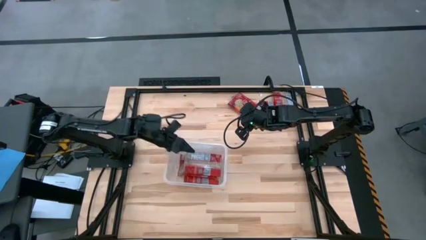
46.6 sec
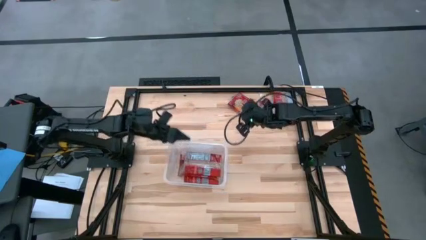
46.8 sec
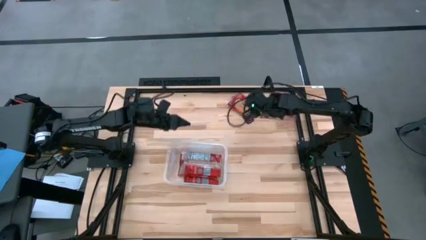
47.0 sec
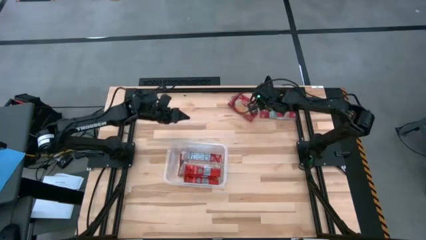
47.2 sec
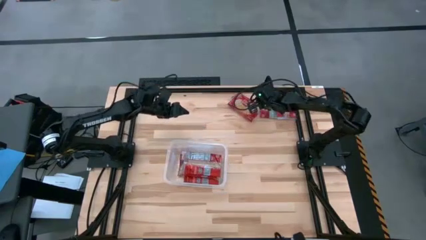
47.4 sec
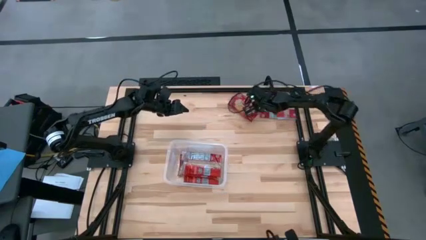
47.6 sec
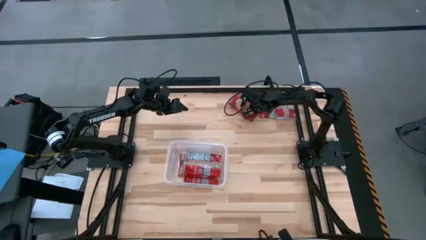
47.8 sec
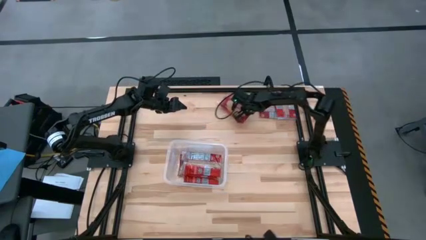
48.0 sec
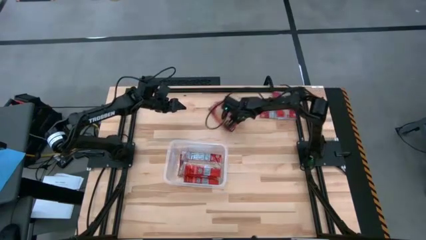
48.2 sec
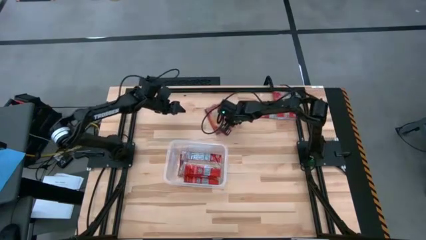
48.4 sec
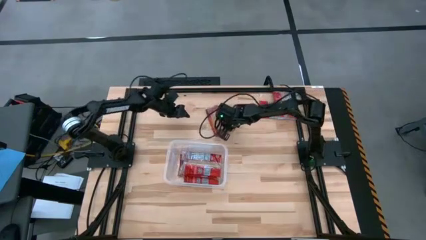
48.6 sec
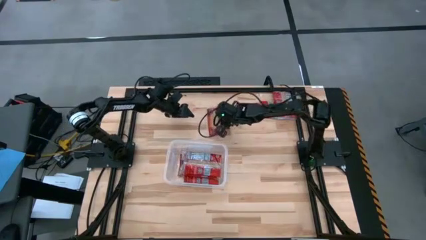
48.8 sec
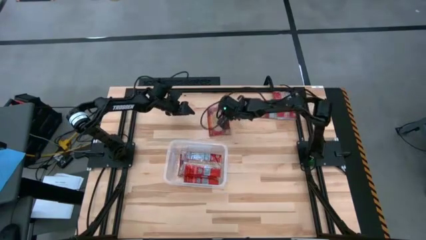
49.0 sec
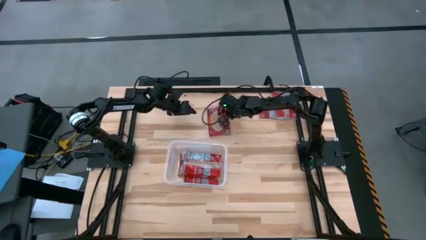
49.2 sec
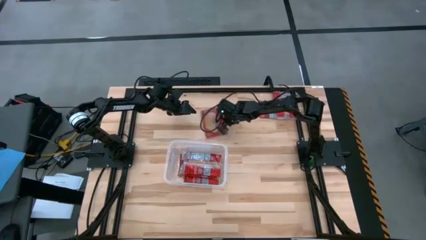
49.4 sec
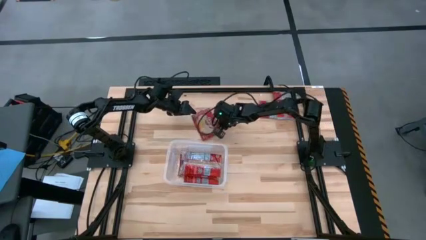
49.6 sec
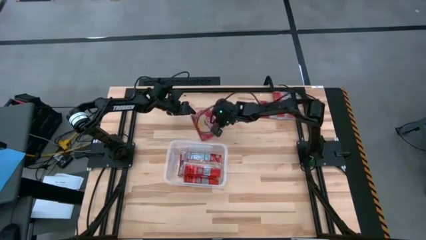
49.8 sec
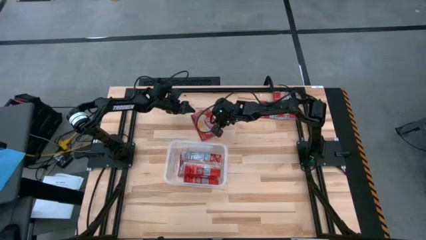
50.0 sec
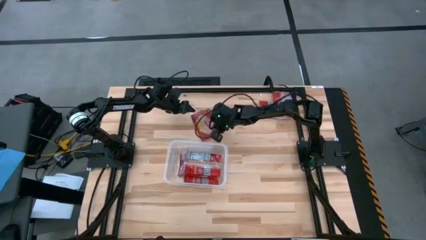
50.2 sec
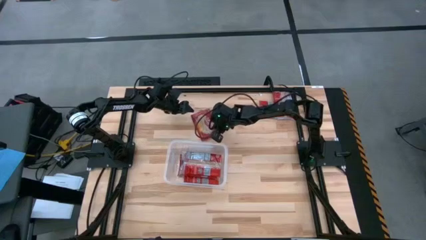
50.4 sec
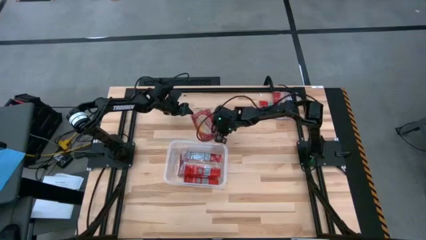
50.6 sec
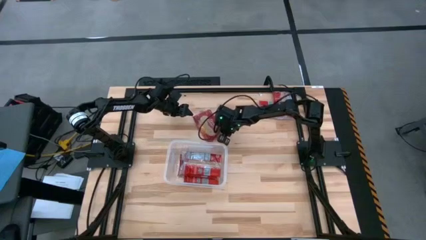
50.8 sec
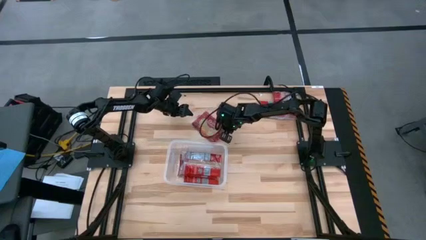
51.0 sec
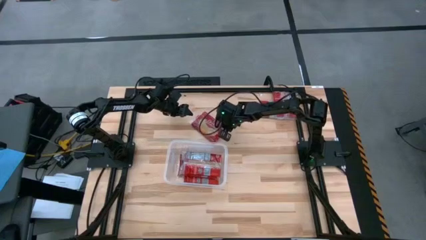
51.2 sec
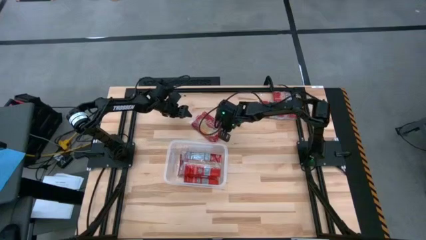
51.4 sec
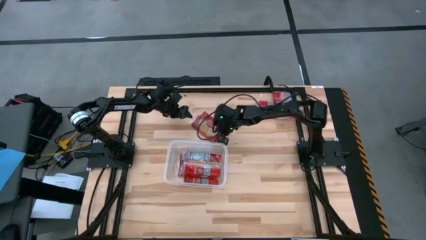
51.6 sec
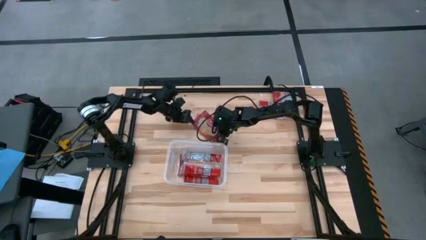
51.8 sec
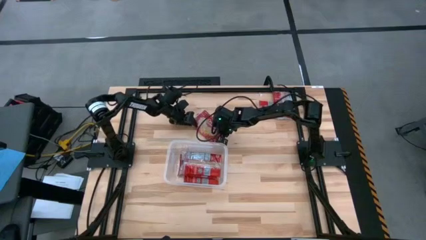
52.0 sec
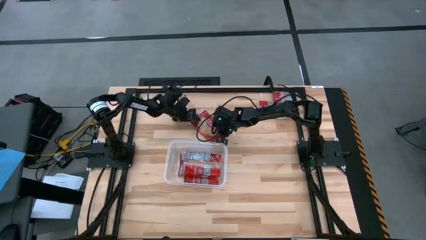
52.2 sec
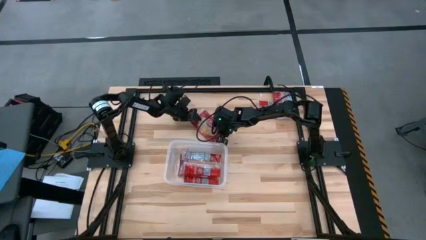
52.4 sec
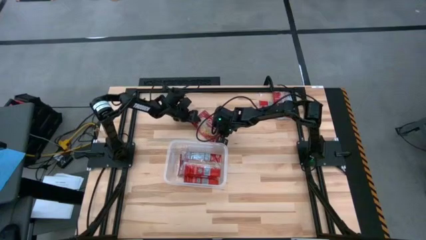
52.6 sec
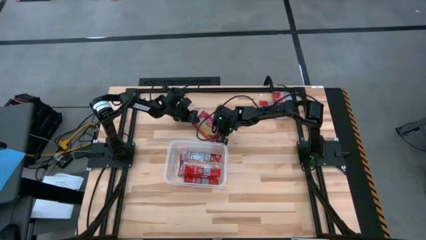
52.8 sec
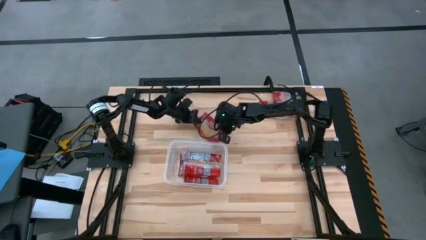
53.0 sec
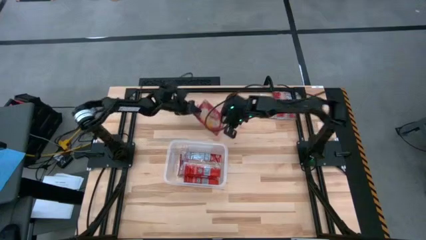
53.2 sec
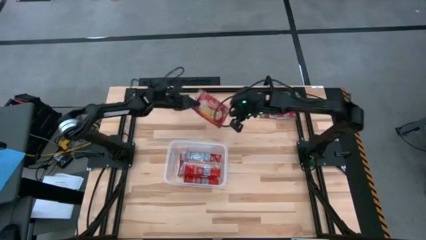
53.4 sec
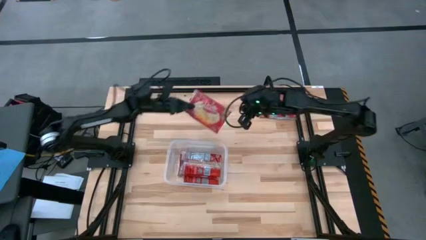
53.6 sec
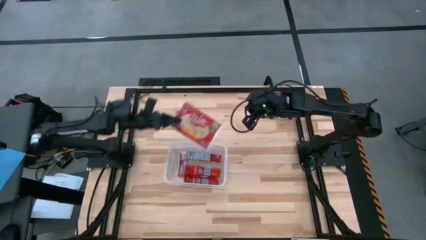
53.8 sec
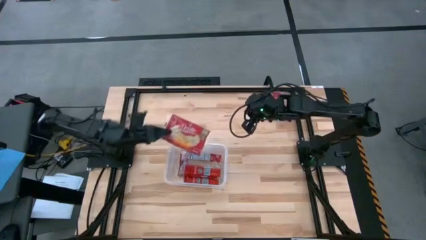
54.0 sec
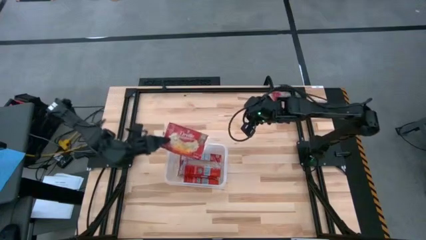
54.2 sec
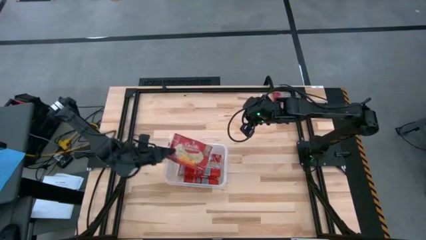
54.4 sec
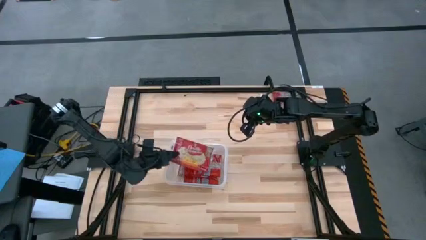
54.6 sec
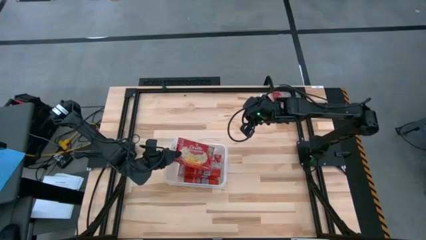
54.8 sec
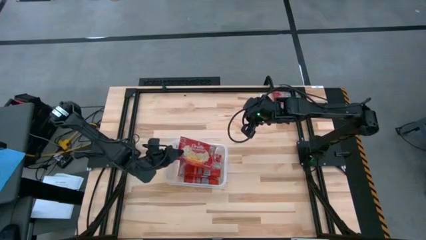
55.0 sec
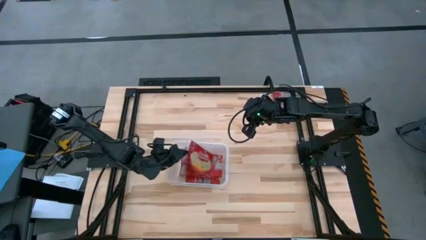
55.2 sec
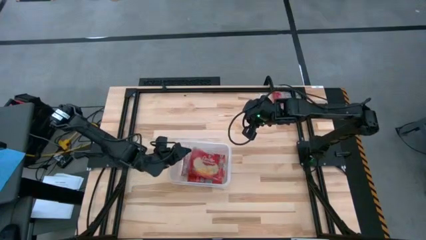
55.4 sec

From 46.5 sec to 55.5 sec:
Task: Sort popcorn bags into baskets
Put the red popcorn bag into the container

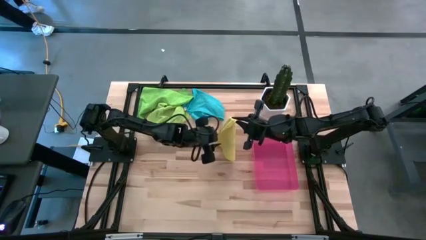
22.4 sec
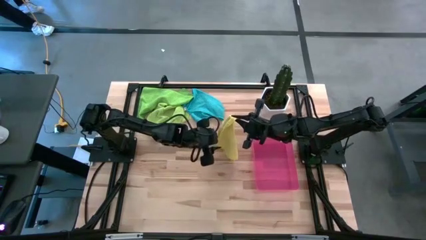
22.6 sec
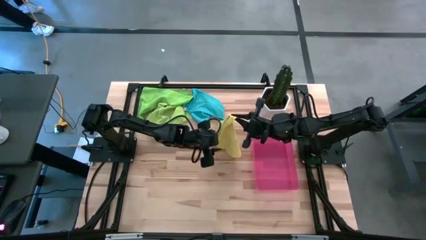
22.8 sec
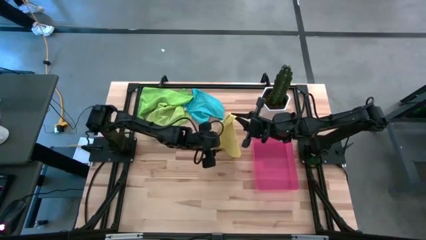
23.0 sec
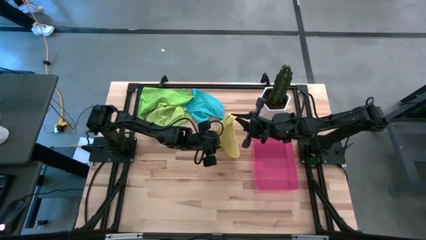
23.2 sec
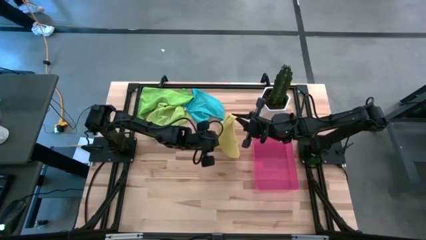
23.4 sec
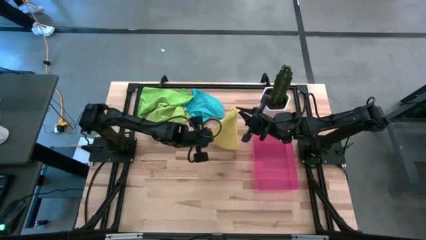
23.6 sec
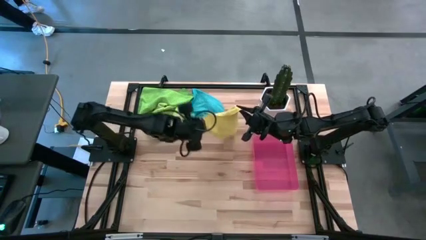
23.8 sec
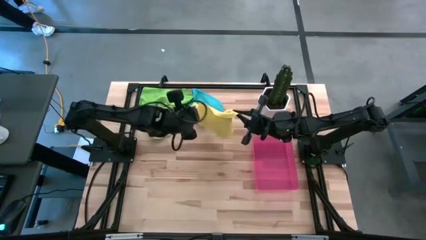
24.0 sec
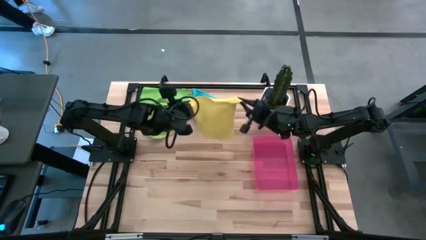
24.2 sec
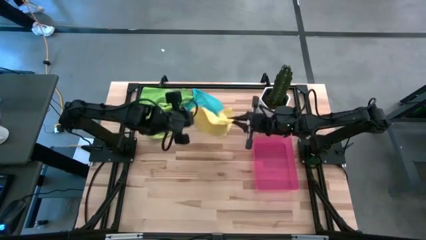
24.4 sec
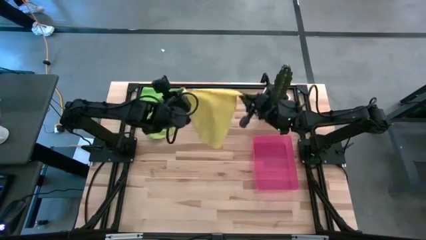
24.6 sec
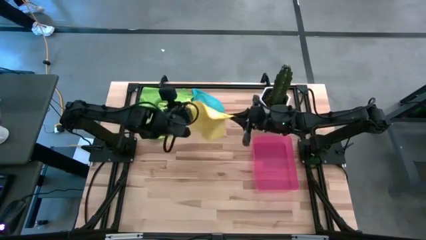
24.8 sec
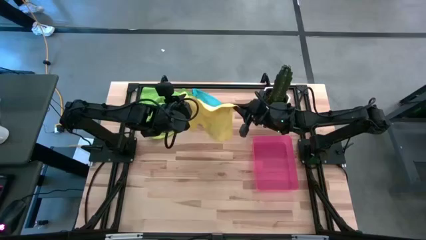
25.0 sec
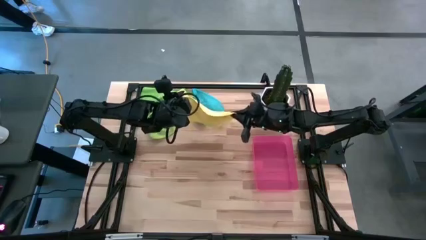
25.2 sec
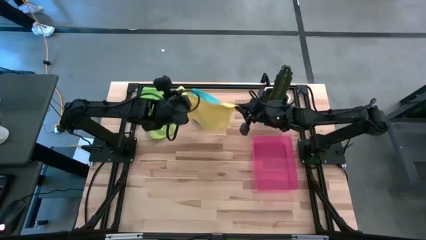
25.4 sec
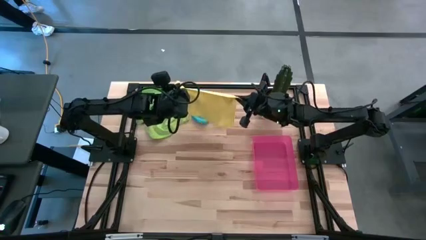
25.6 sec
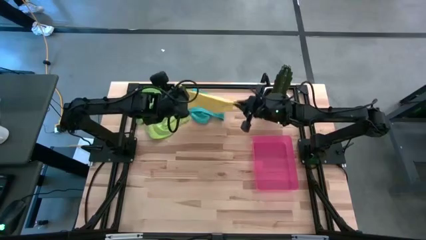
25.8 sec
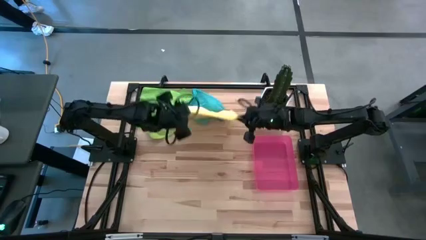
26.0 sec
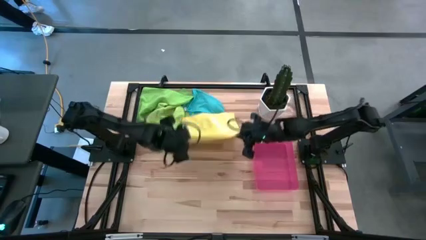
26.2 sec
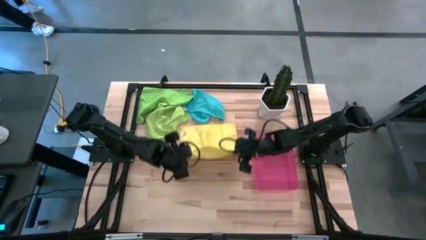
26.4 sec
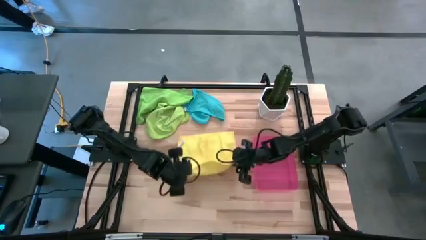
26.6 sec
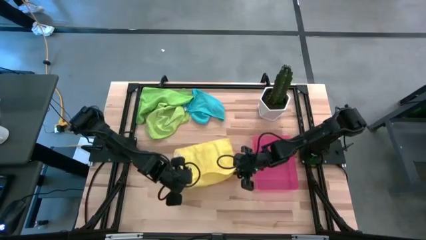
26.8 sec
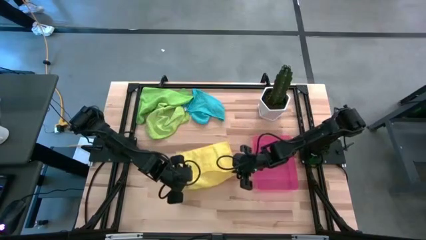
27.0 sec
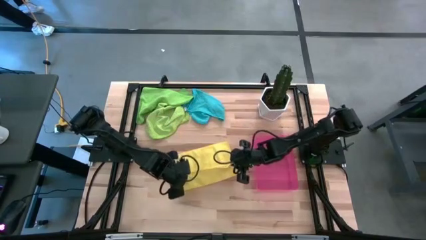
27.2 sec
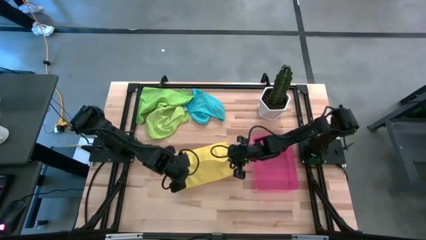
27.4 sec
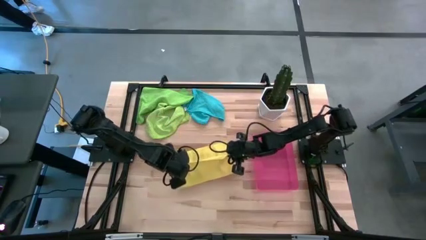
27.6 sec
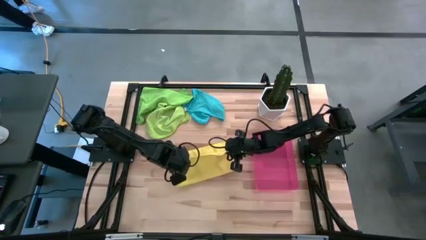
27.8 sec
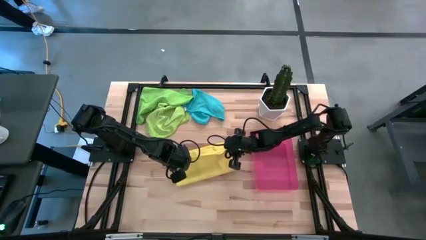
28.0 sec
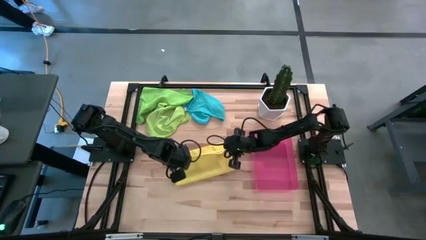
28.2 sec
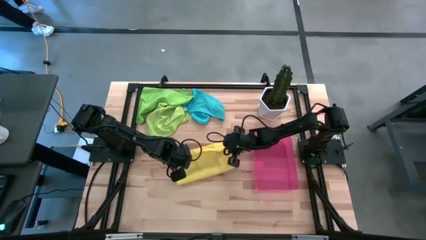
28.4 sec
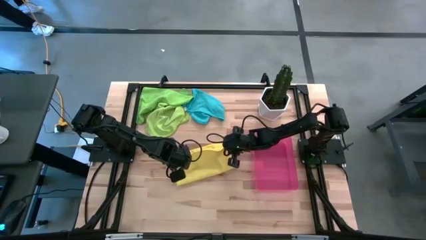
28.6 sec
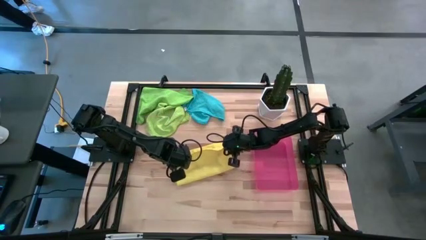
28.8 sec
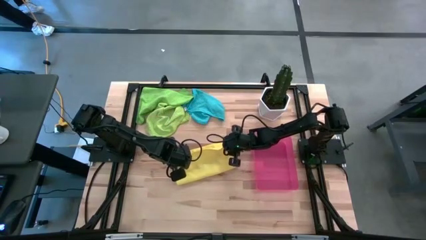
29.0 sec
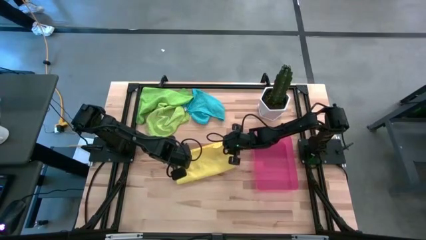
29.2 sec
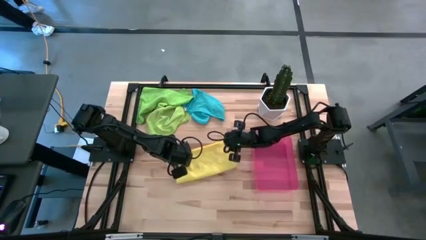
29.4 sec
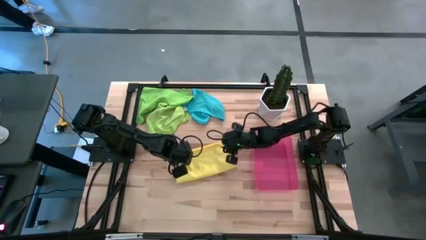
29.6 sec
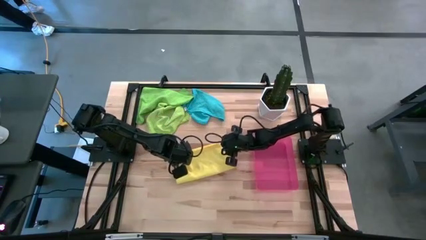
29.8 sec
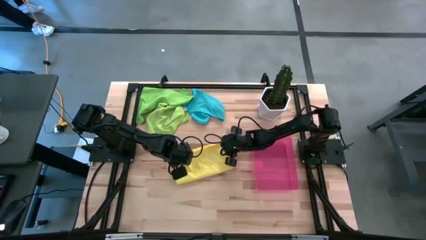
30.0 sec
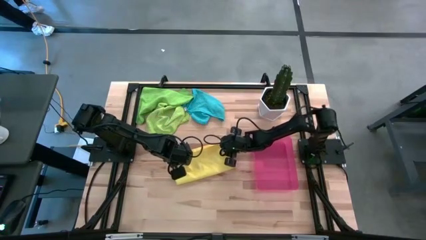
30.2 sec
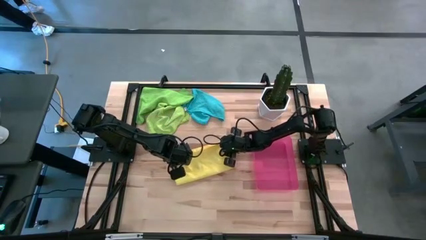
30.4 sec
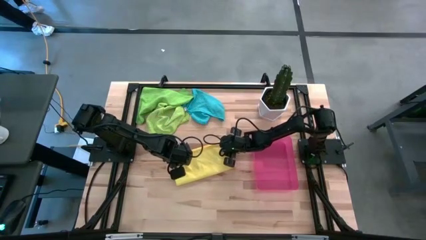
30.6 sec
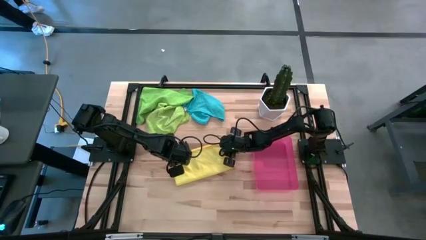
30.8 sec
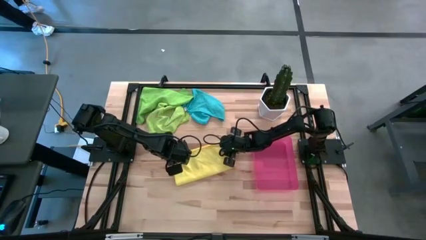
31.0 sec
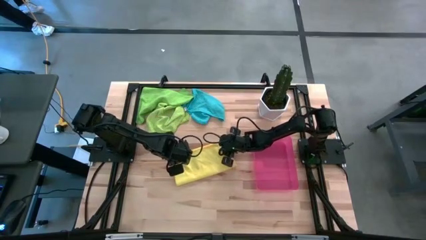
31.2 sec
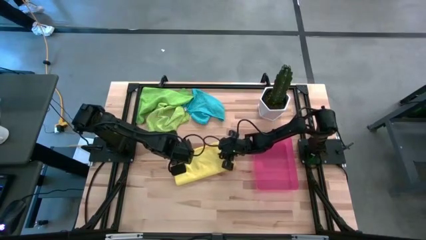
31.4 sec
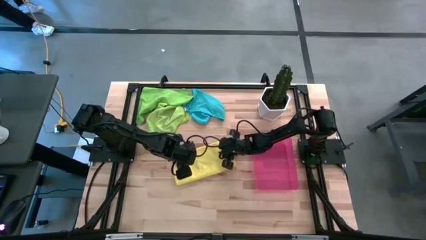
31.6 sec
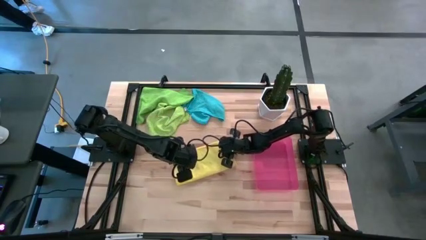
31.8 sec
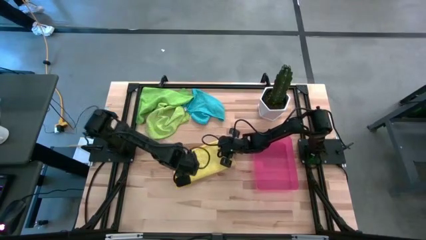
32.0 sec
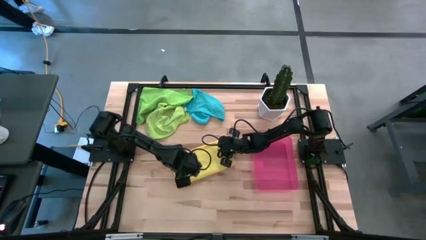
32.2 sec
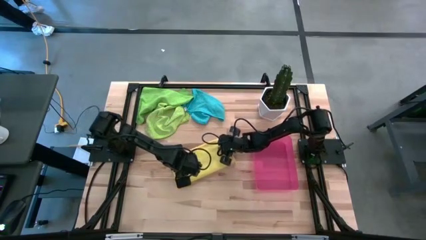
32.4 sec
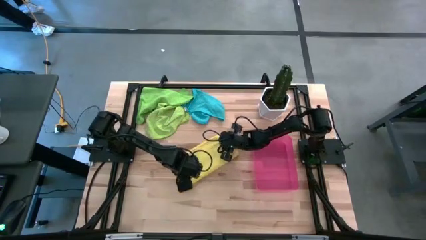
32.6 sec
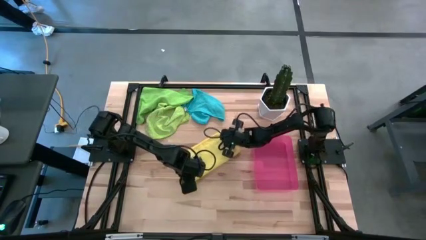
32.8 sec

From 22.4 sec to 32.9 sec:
Task: Roll microfiber towels into tight, uniform cylinder then place into a basket
Fold the yellow microfiber towel
